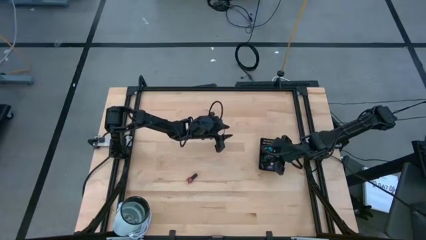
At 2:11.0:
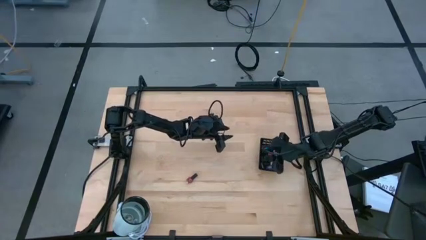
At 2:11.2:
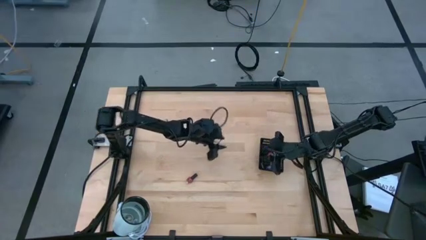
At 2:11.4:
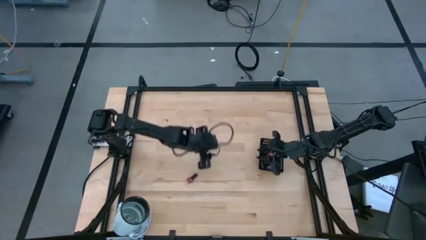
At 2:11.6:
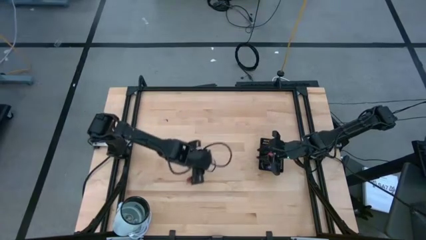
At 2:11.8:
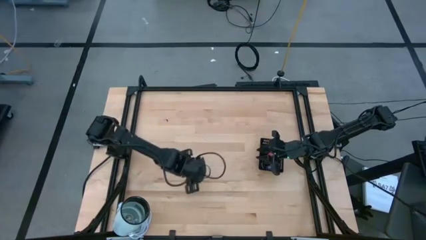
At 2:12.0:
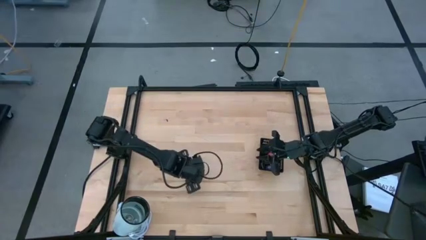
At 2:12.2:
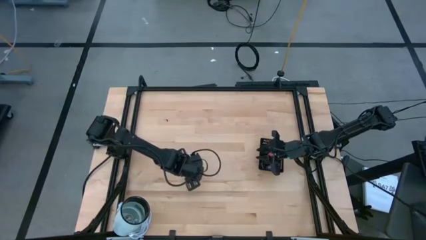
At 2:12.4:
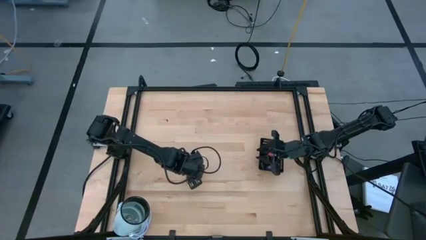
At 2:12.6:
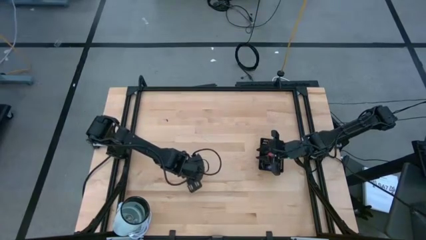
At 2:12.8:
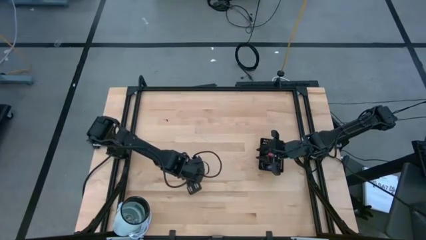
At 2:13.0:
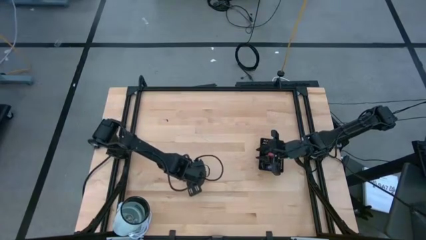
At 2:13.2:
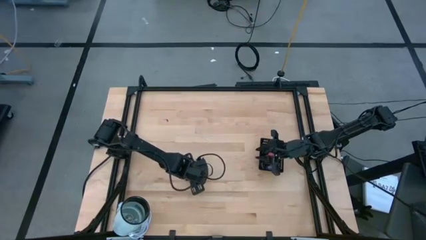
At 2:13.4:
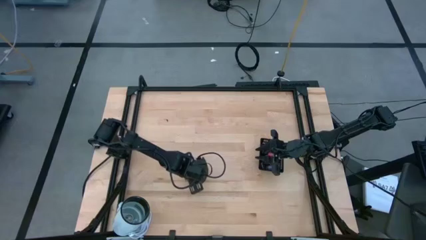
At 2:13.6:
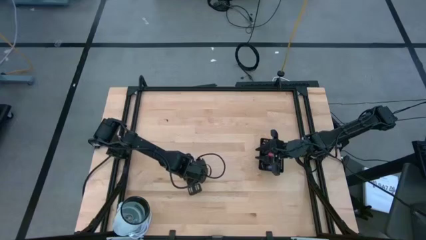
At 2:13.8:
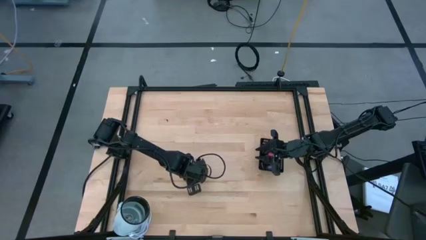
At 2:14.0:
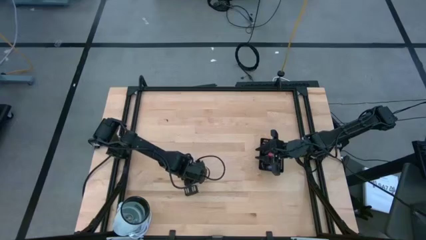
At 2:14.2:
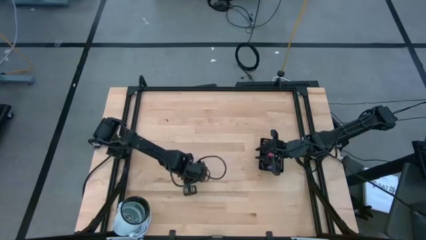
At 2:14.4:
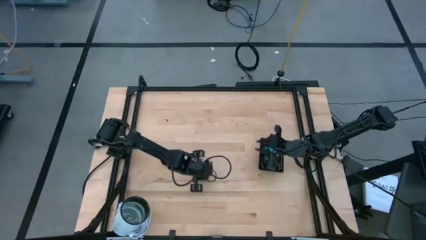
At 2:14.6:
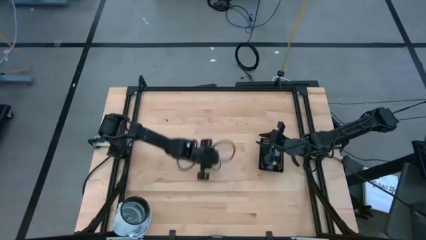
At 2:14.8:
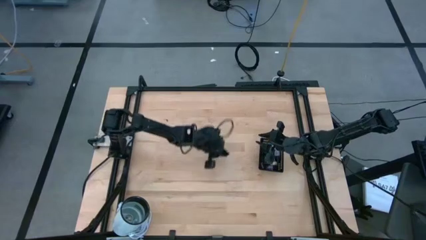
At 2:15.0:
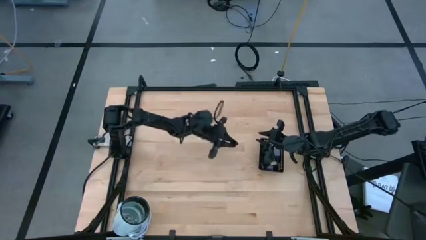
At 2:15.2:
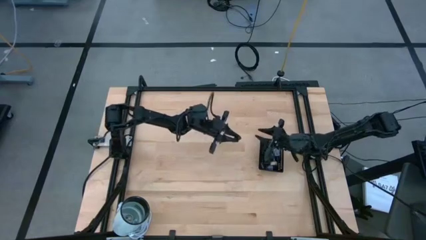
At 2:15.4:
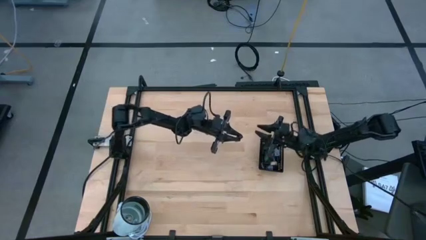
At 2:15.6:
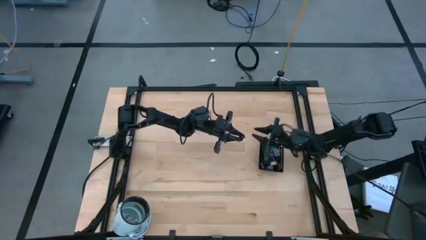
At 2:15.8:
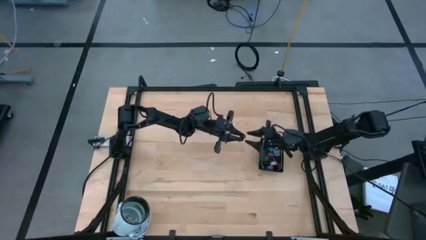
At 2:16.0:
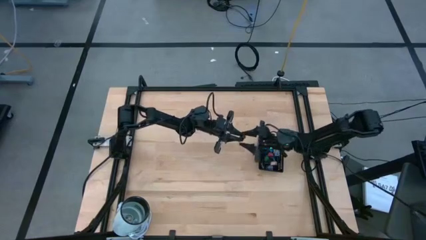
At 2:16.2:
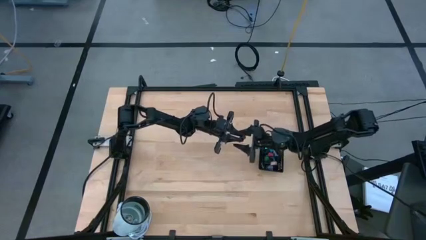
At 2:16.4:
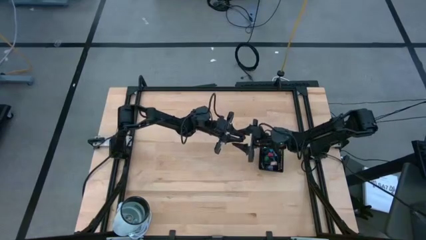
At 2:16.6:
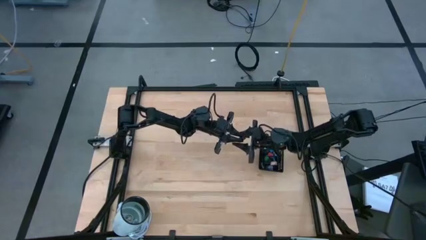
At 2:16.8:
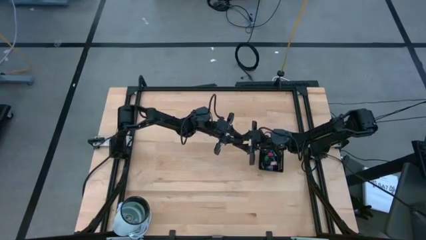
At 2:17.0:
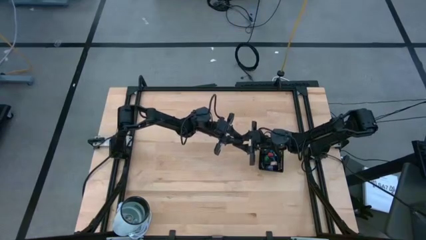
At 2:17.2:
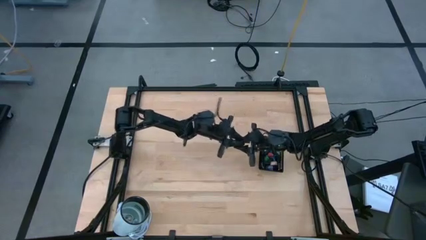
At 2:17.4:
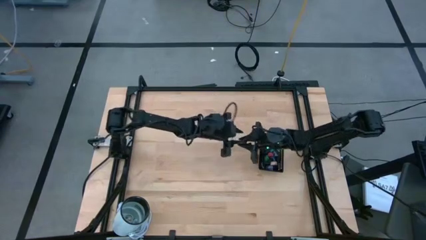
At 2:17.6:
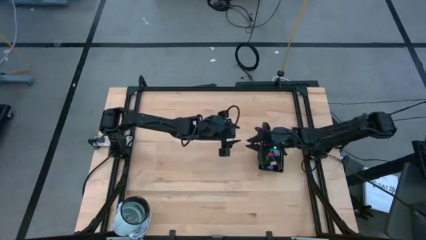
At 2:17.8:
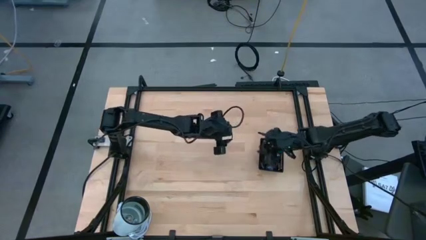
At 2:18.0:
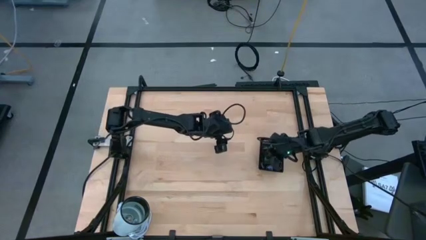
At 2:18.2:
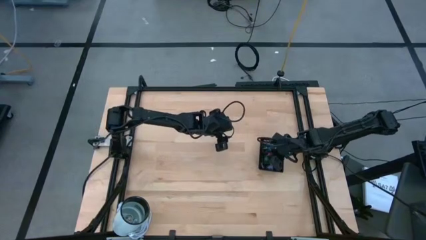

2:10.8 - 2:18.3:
Task: Pick & Place Nail Polish
Put the red nail polish into the black basket

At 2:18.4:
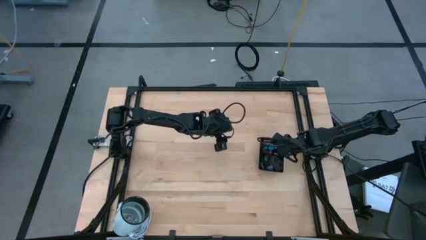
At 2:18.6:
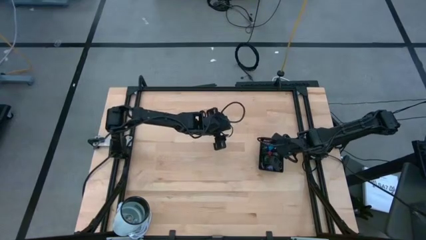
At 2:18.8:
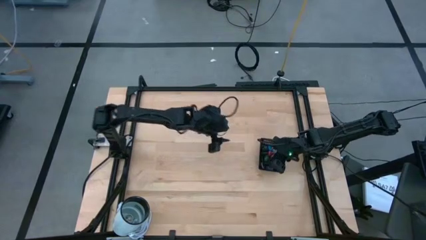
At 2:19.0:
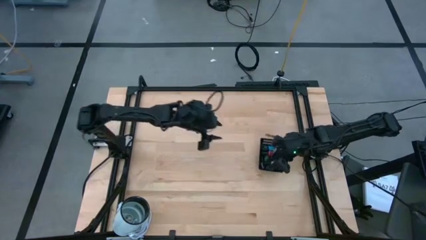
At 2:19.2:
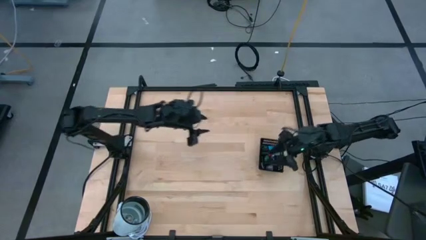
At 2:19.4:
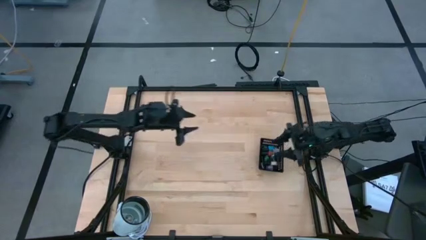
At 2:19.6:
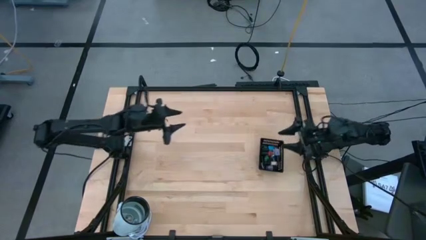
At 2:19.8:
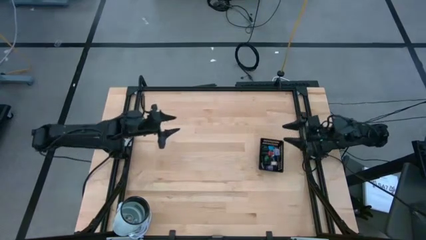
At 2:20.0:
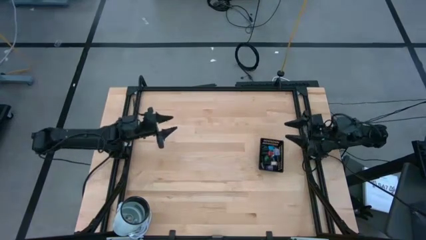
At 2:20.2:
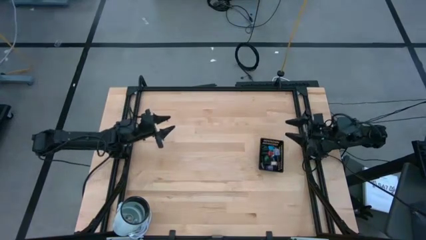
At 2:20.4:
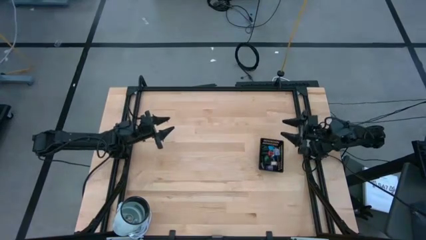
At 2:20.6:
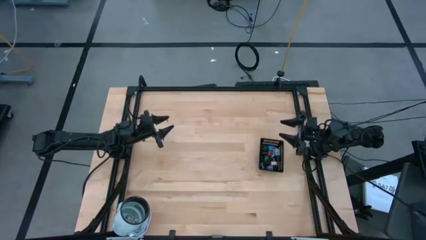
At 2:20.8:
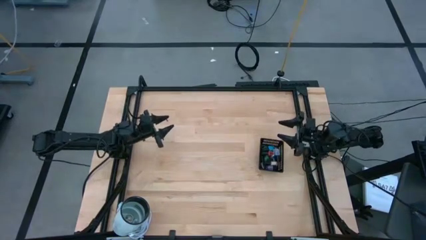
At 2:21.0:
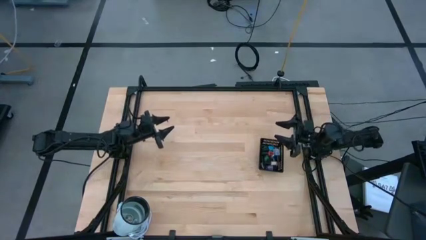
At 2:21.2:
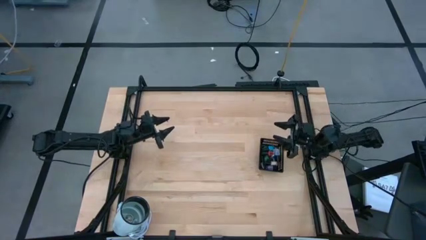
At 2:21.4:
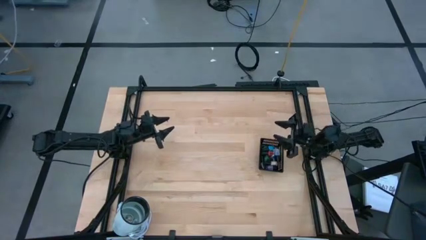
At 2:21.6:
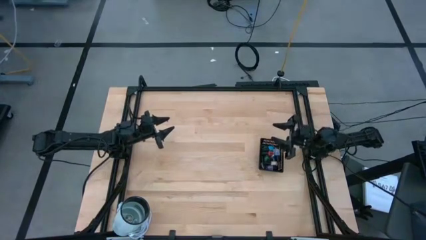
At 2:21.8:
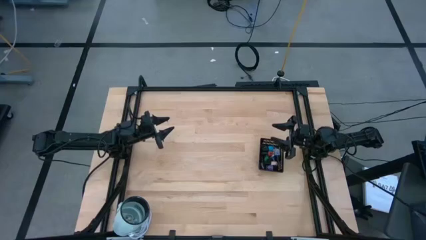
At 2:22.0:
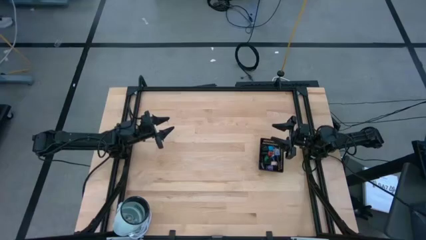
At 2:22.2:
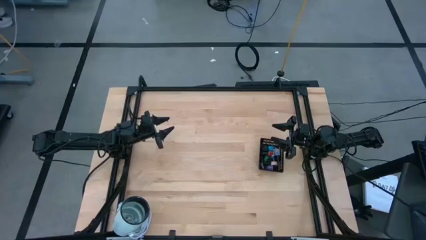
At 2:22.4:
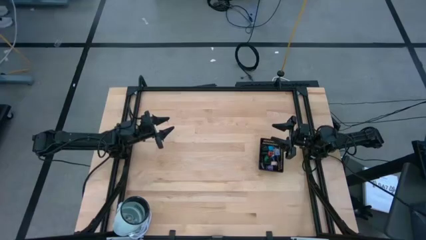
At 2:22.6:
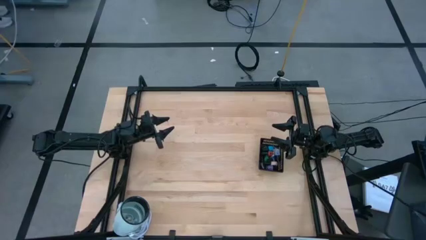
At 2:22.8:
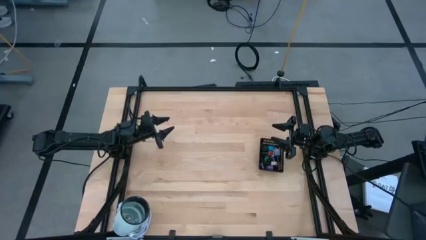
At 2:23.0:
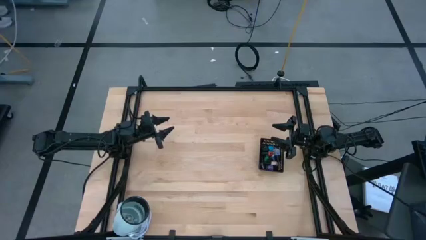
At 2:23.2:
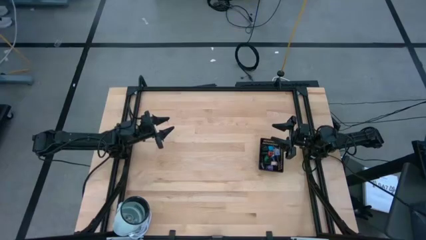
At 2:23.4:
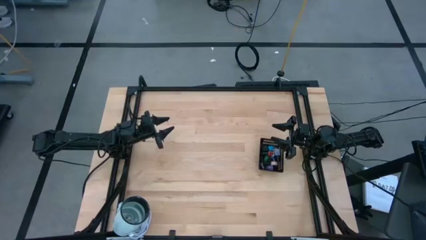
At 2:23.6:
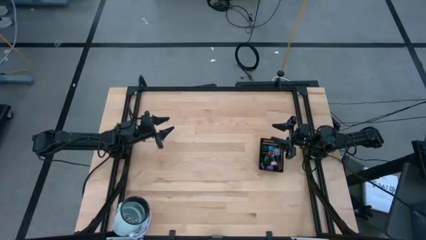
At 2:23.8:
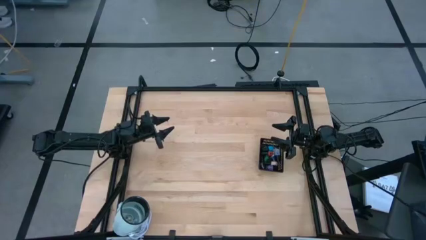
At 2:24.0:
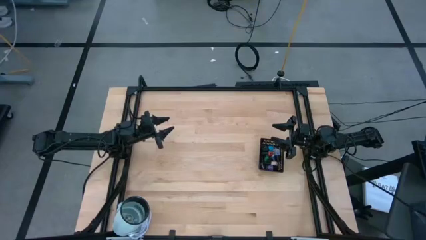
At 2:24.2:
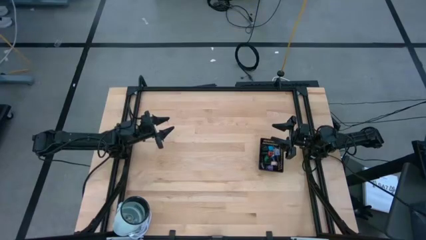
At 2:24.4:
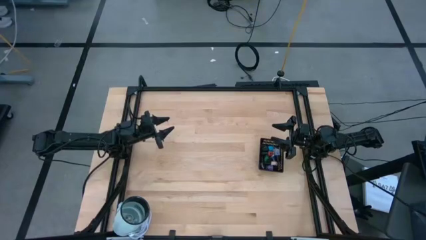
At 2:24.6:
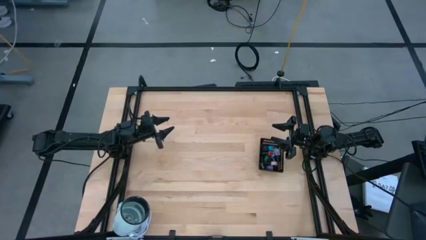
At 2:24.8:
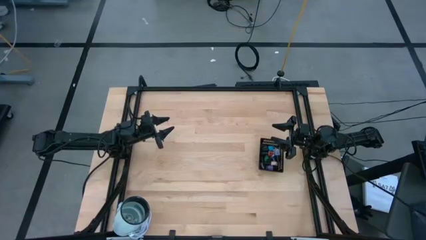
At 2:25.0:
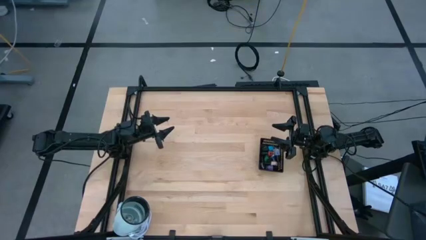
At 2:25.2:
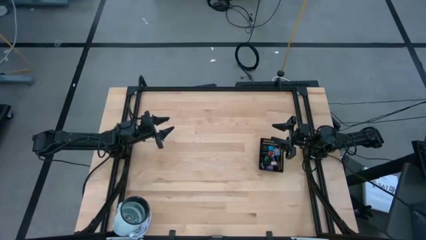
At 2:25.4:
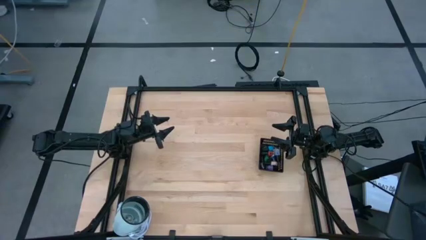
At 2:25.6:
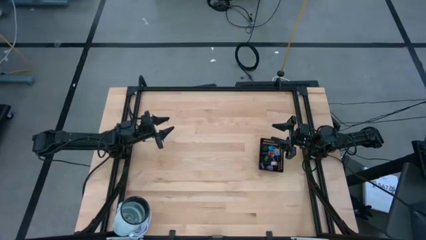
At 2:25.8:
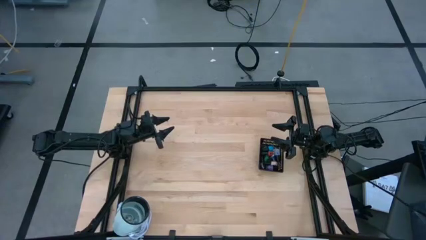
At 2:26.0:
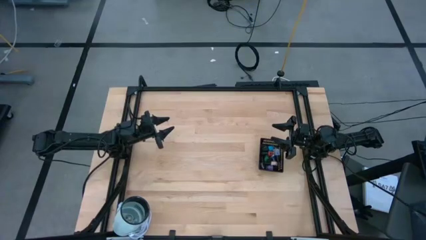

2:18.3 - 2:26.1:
Return to Home Position
